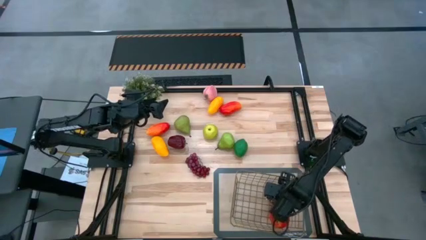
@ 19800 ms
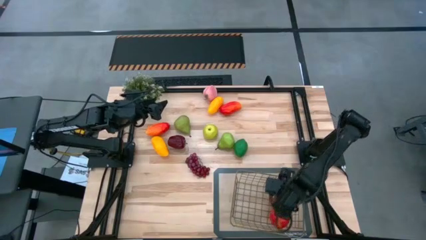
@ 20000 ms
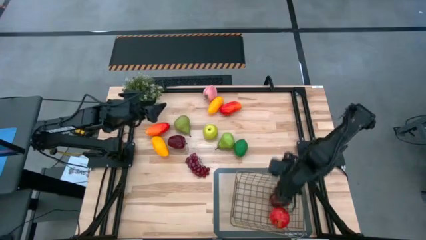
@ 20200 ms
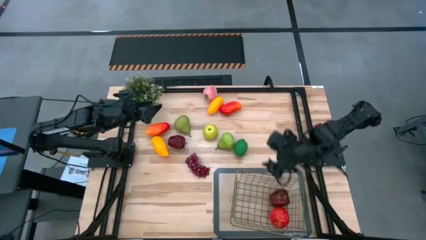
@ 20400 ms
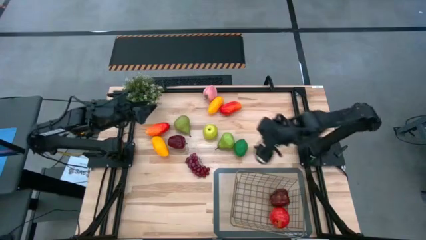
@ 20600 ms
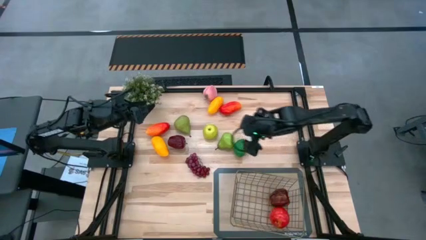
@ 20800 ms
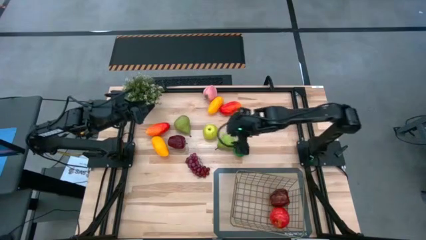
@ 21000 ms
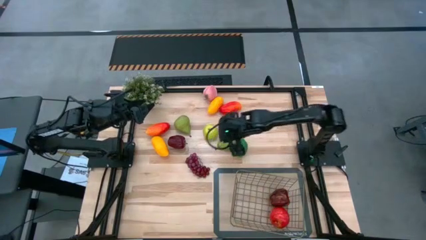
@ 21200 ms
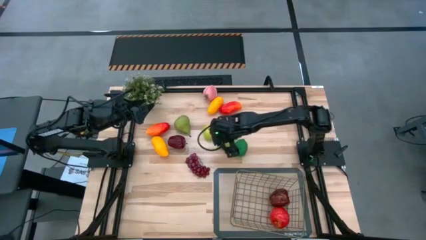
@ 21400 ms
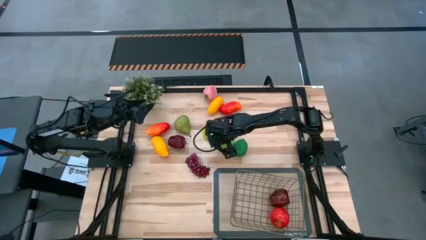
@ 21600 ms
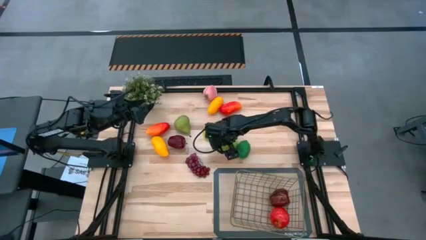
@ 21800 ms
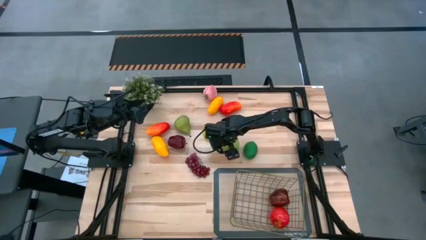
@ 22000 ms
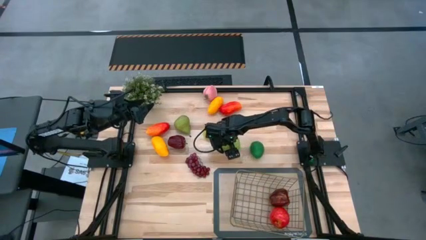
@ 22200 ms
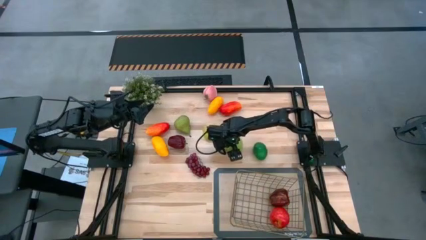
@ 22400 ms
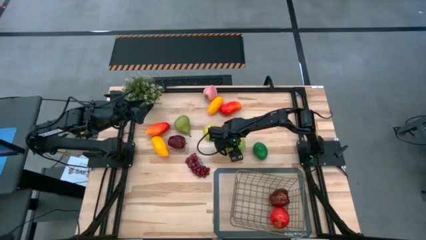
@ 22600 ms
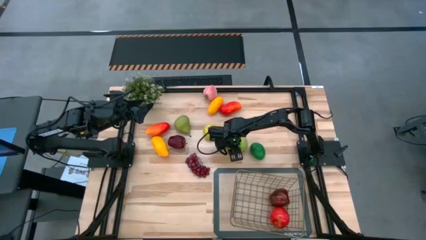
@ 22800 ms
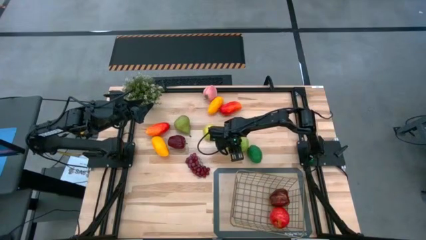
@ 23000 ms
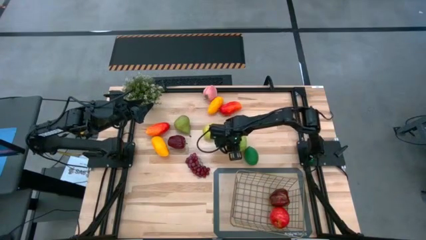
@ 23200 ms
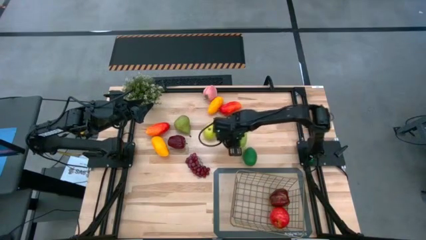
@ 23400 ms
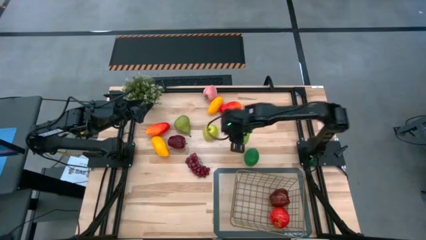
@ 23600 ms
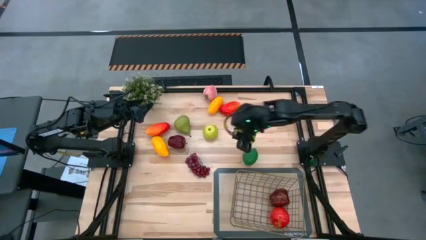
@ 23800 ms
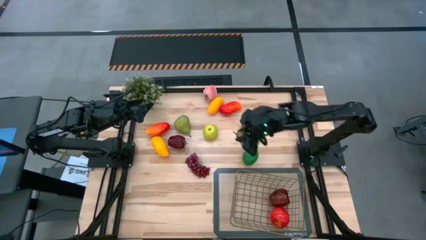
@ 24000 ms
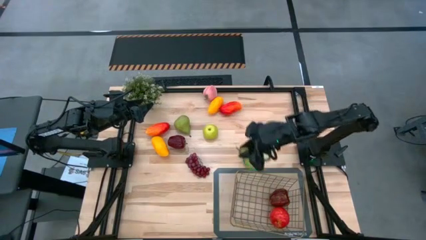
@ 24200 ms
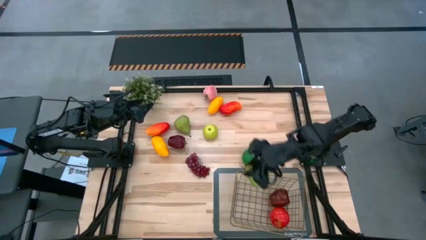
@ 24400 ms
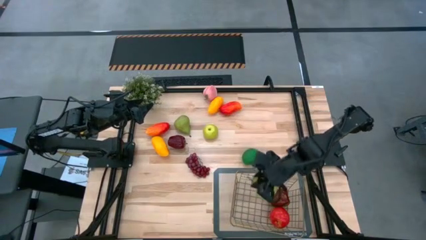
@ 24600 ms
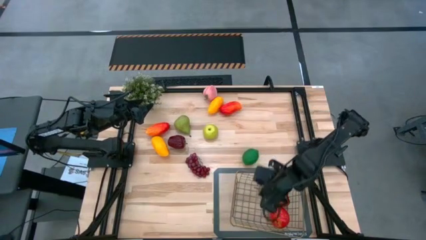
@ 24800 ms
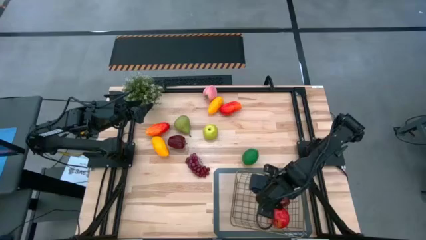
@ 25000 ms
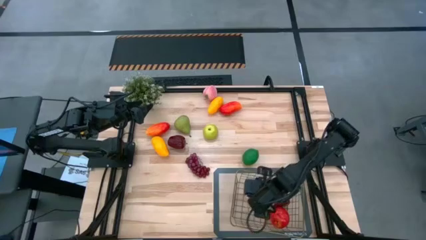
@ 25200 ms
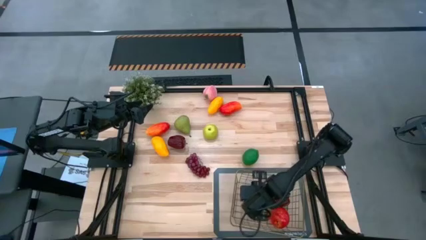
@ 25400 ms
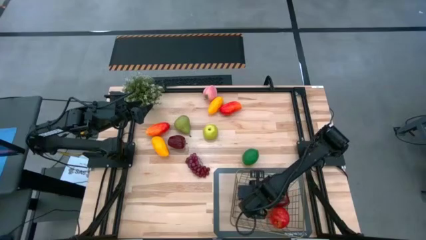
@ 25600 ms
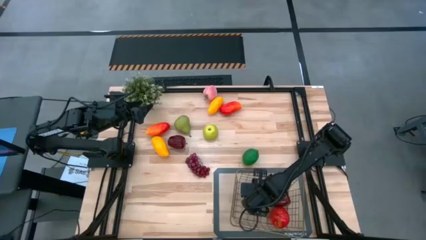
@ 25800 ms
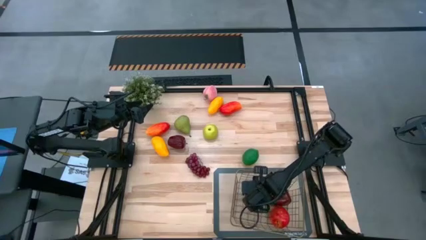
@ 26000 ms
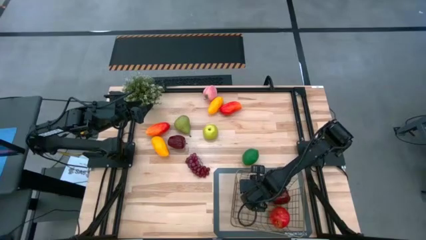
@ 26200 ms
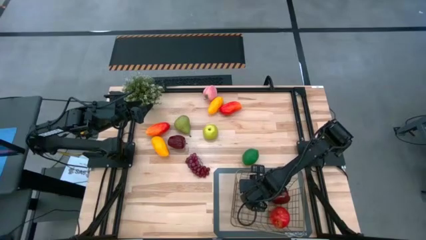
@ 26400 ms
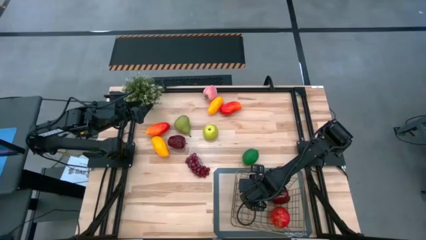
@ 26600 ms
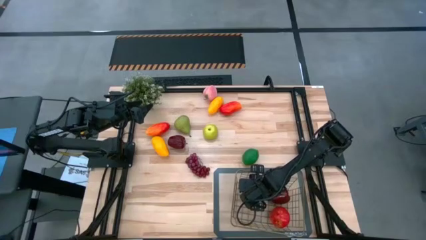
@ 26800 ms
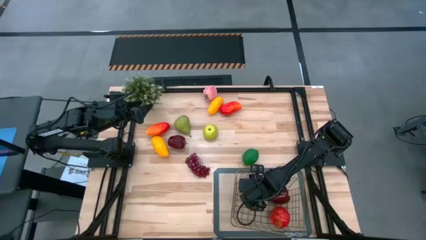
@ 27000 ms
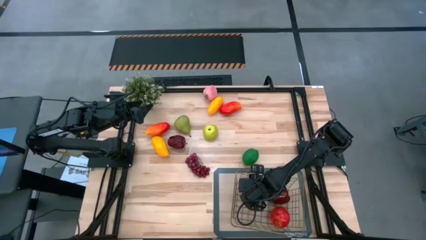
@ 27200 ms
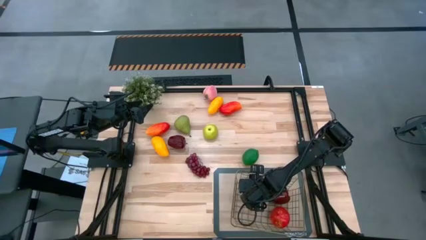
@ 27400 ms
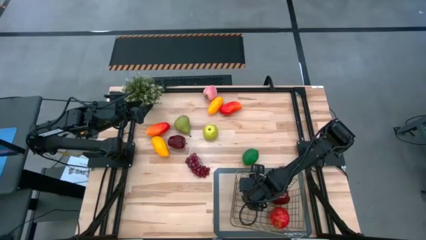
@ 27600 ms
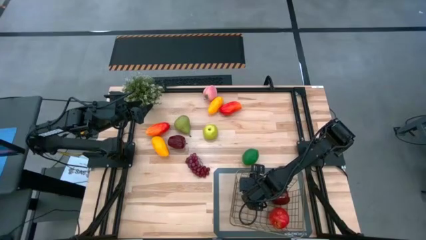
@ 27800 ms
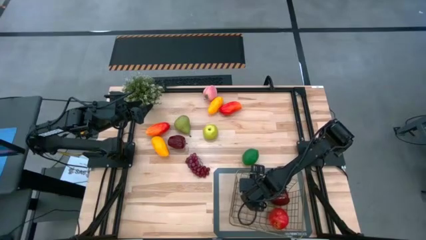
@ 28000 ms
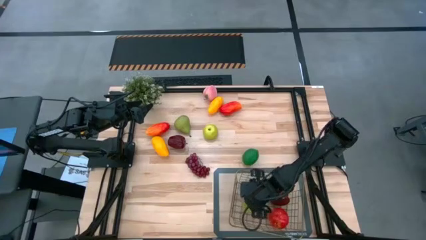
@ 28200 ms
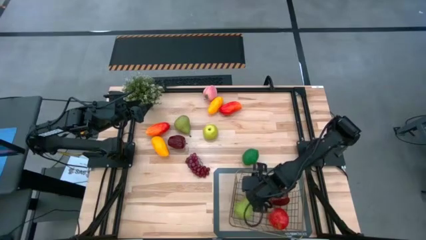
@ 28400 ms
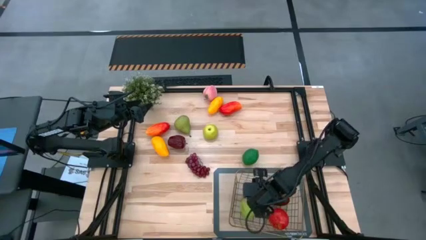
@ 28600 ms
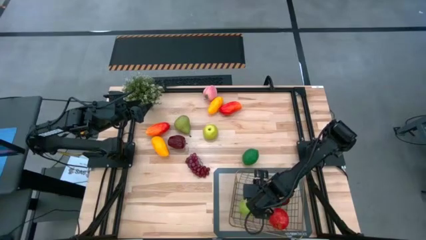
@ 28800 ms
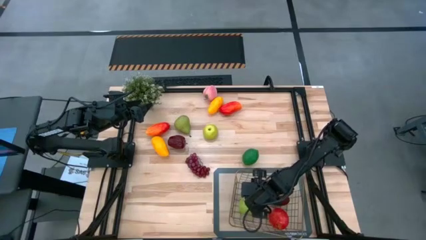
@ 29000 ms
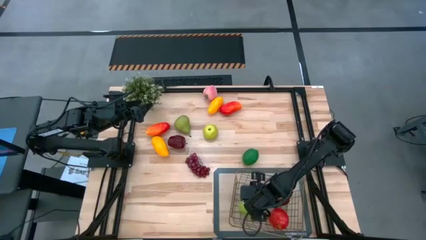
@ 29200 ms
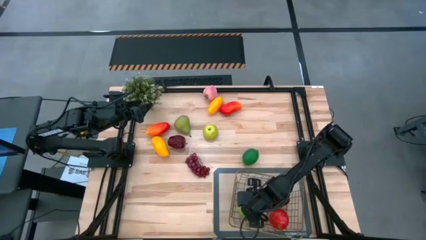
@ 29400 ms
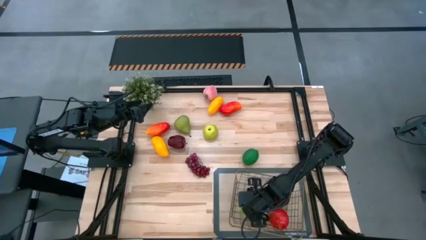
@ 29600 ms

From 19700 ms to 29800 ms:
Task: Build produce basket
Put the right green pear into the wire basket
